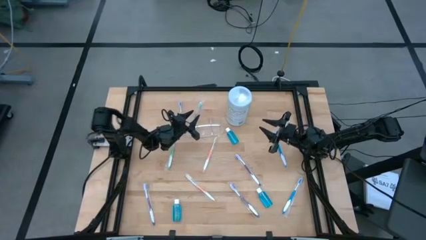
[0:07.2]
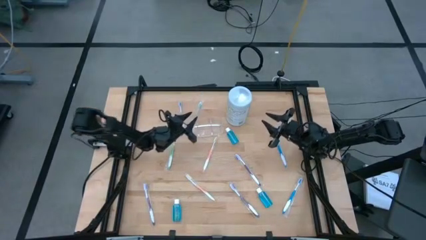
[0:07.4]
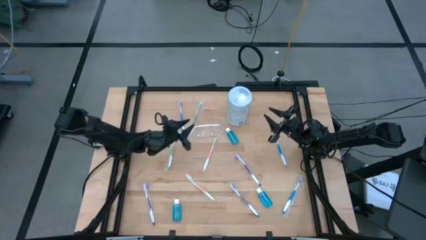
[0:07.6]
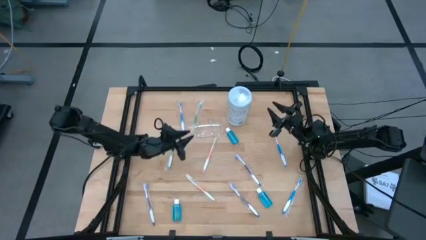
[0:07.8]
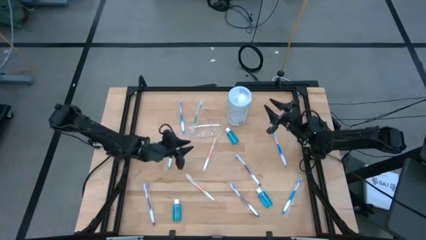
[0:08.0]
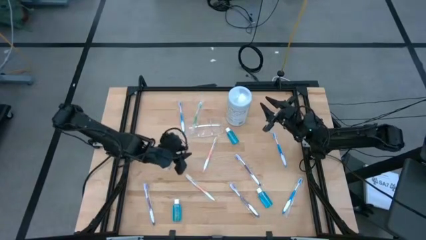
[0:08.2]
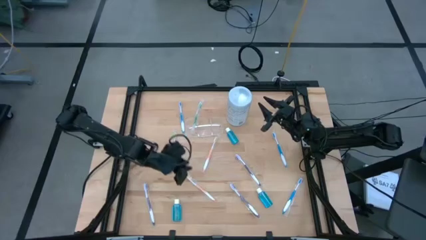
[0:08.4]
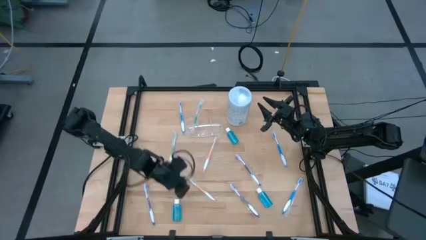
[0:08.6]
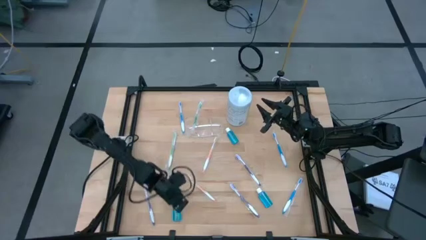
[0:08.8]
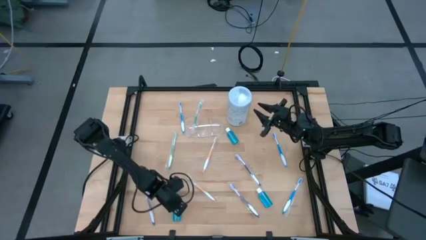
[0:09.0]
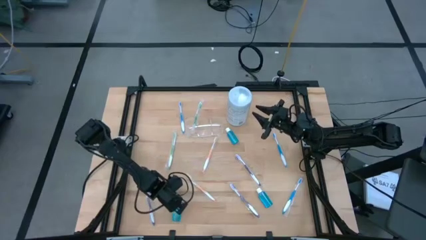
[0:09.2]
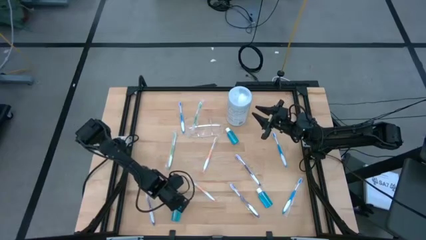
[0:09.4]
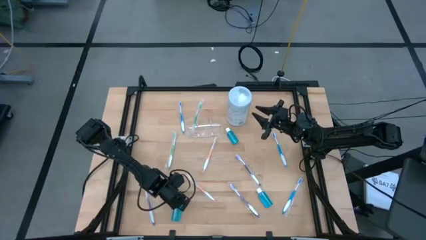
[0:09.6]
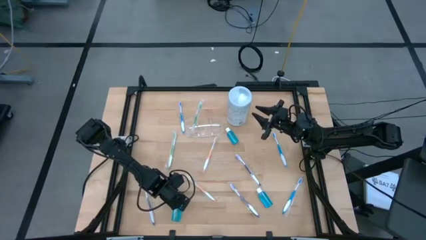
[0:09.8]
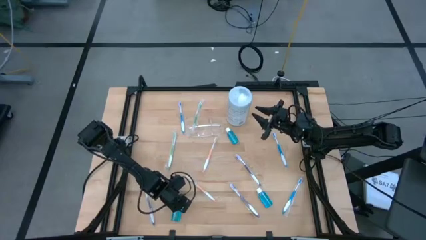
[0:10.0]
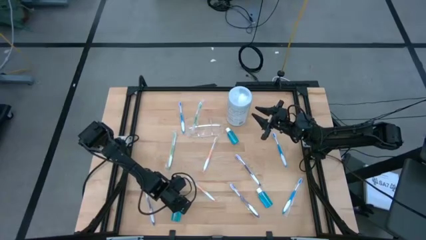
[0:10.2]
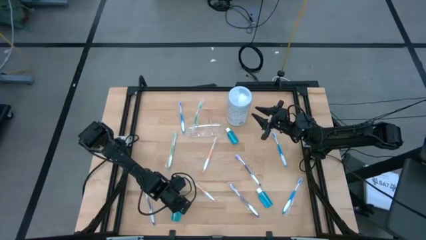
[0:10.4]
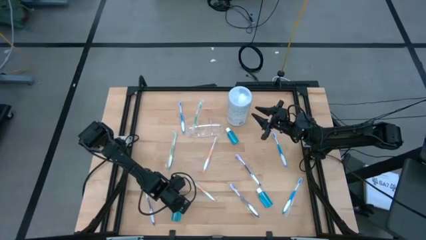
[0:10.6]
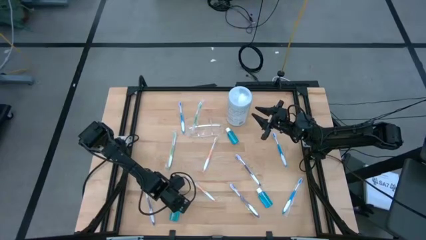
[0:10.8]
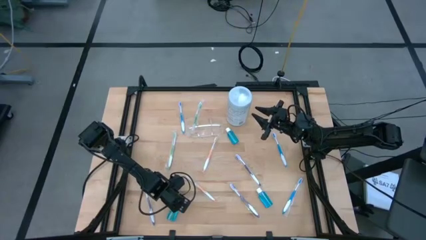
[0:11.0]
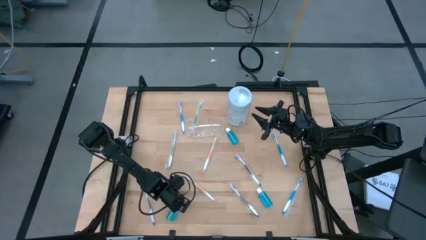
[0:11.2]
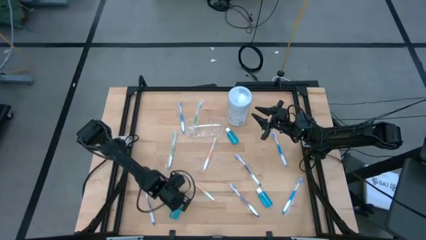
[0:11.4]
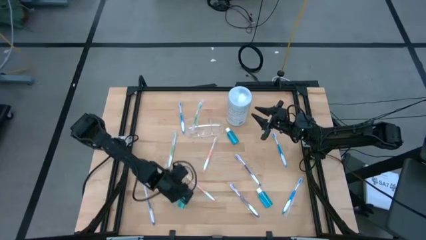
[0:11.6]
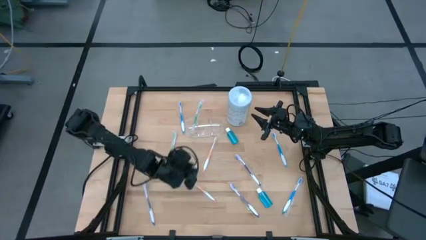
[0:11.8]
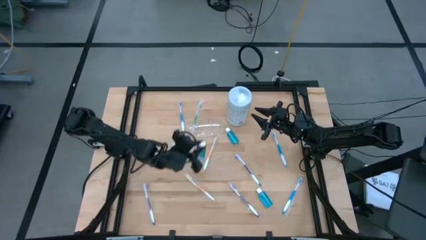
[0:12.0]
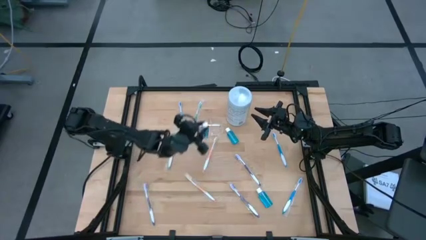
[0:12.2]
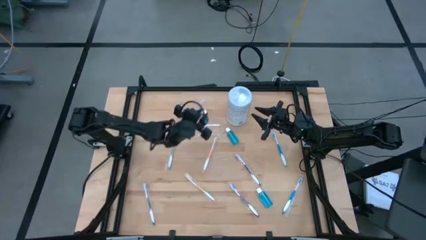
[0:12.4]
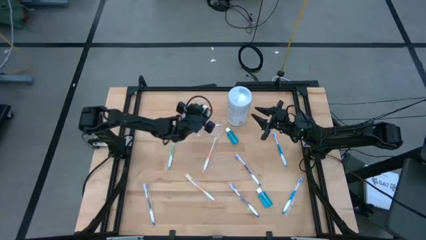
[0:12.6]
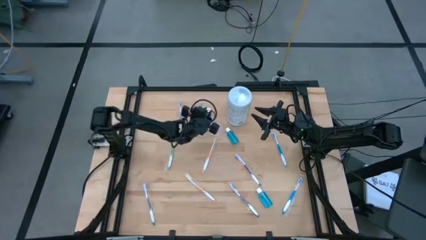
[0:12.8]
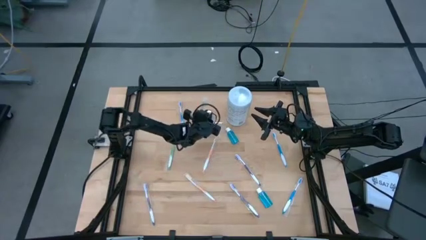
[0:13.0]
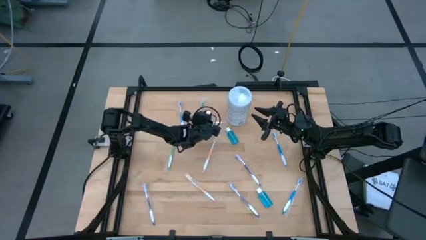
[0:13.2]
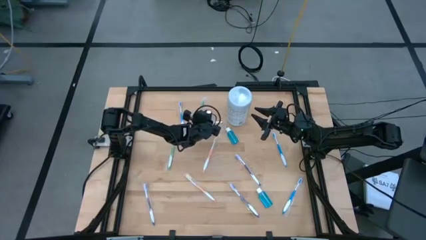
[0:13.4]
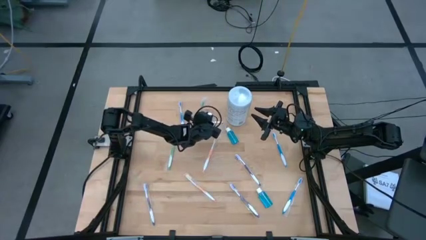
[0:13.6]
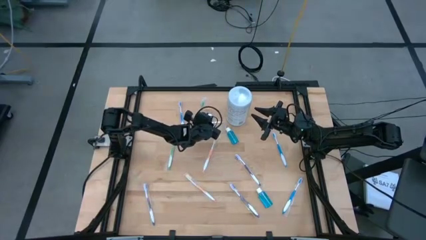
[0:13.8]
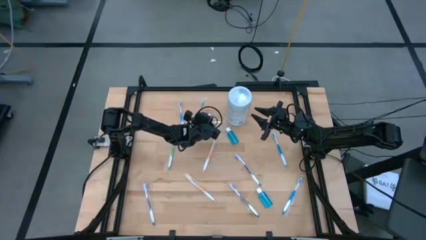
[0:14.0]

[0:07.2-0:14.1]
Task: Pick & Place toothbrushing station
Put the bottom left mouthwash into the transparent organizer

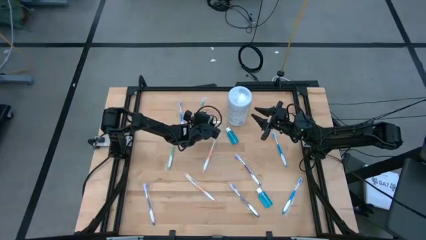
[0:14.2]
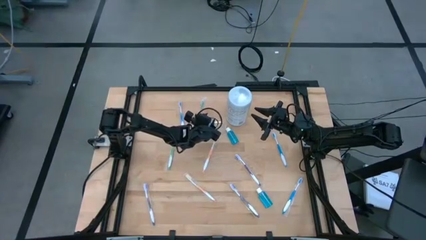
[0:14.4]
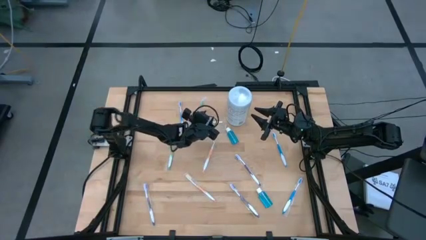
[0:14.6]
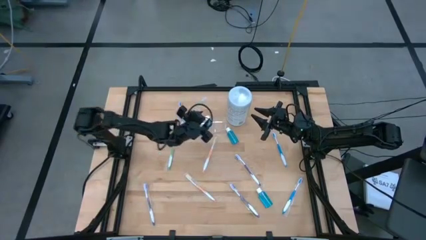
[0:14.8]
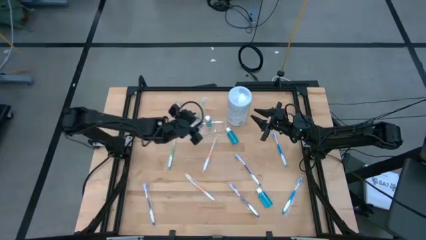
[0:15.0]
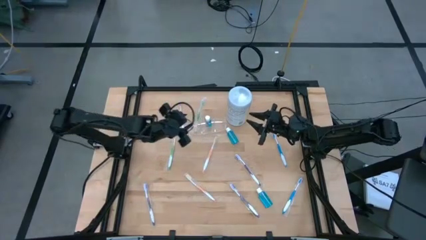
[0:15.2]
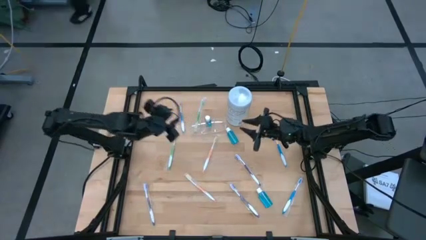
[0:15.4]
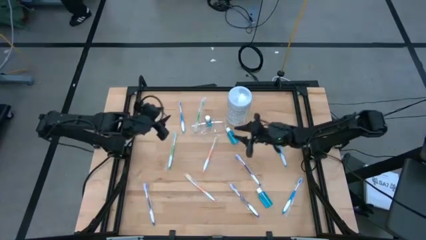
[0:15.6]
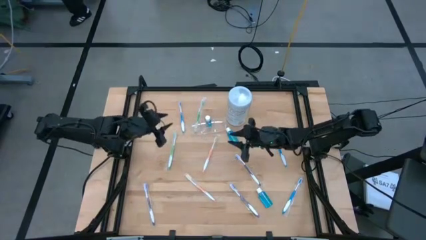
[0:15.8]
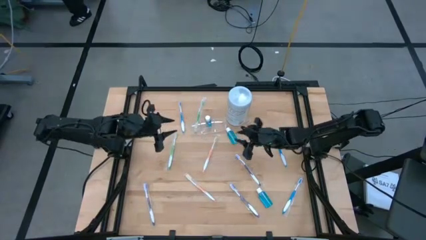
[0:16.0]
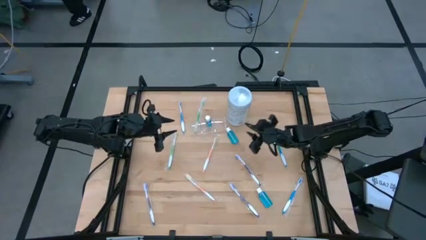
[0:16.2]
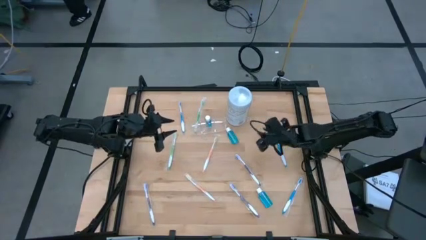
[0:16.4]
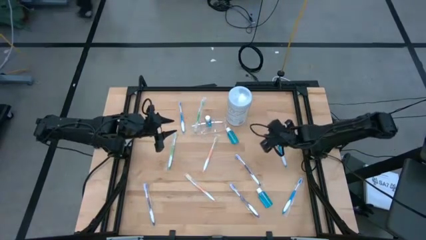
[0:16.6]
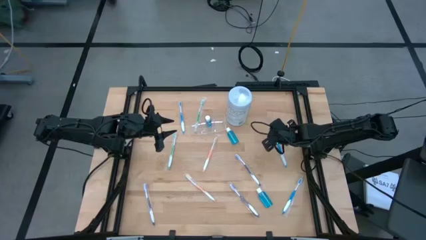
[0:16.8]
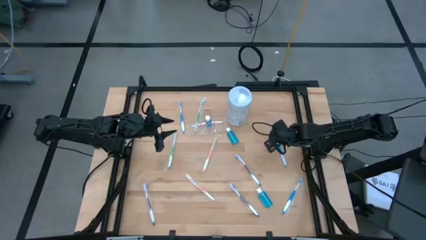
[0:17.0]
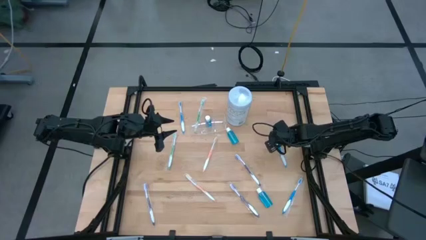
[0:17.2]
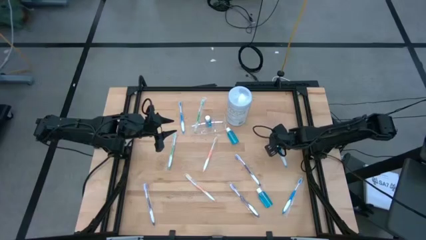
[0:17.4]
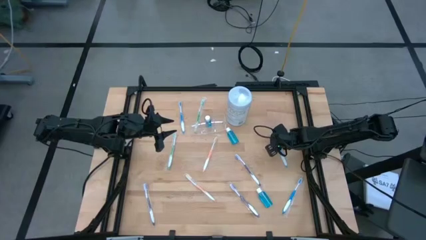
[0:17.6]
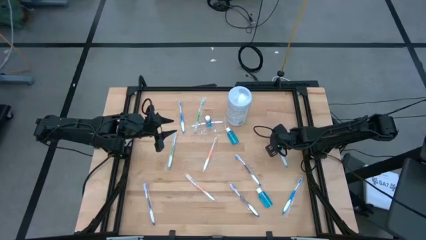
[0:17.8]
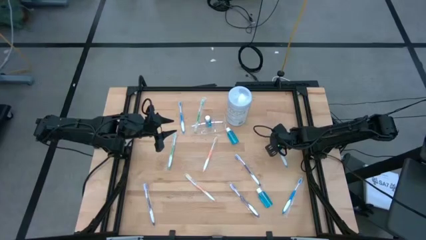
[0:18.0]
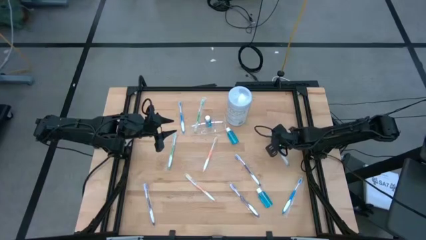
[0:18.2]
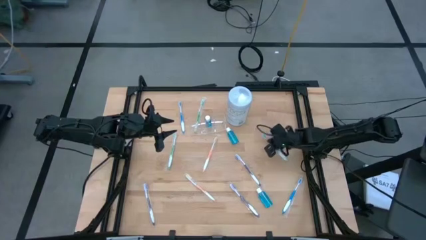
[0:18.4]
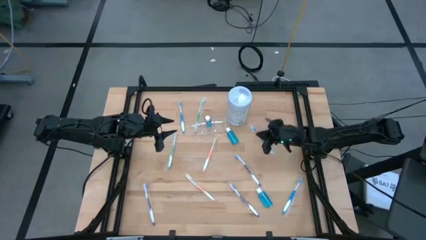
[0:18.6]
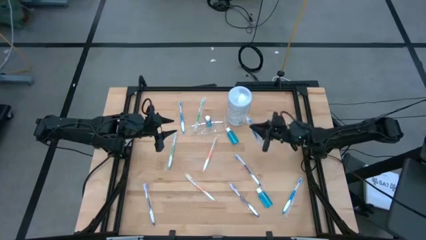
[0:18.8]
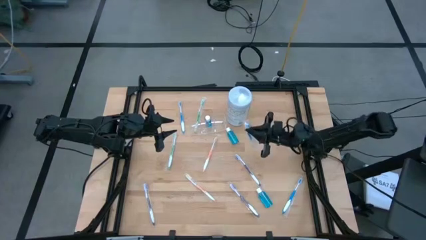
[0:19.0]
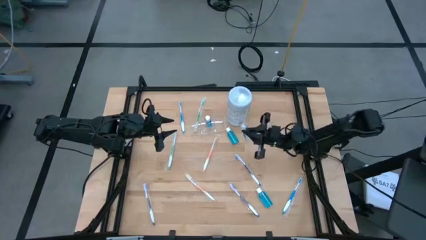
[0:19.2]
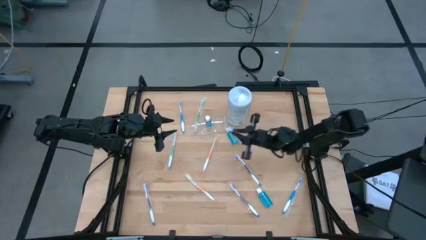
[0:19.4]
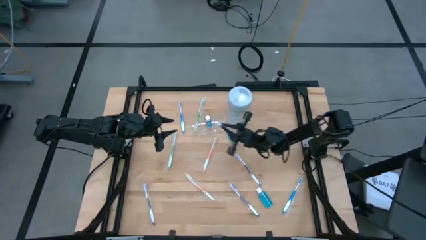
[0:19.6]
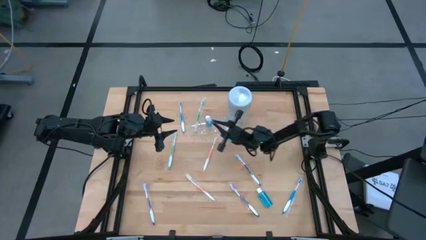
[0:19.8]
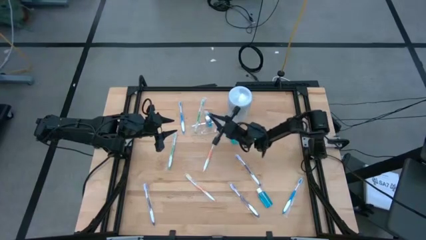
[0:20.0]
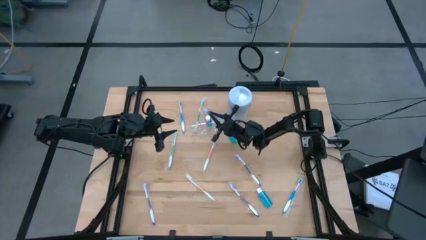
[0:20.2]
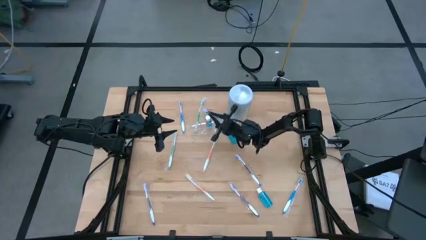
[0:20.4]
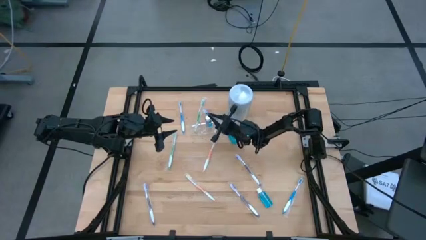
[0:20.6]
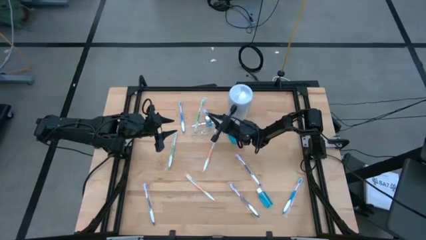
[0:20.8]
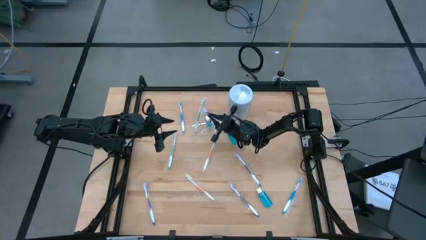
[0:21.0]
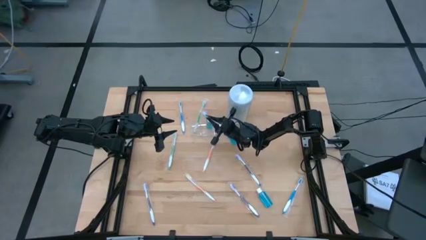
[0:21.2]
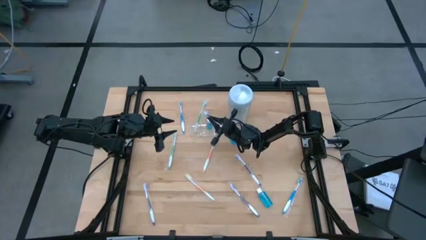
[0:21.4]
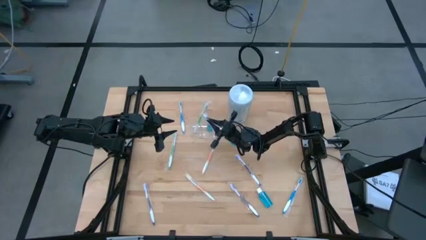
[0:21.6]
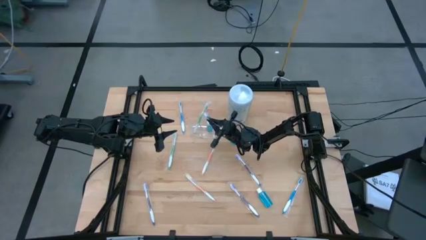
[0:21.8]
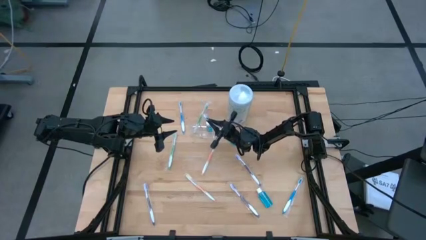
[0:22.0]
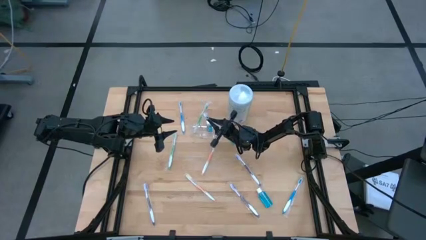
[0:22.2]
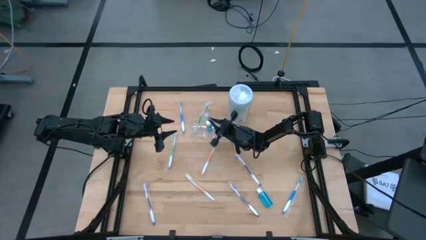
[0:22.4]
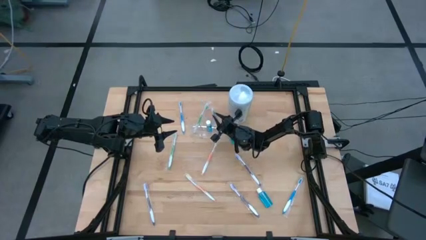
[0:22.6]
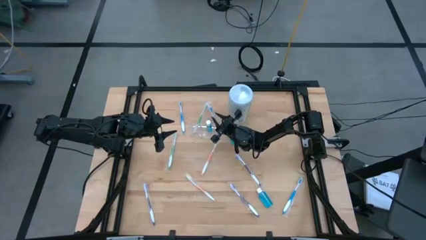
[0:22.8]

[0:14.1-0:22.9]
Put the middle blue toothbrush into the transparent organizer

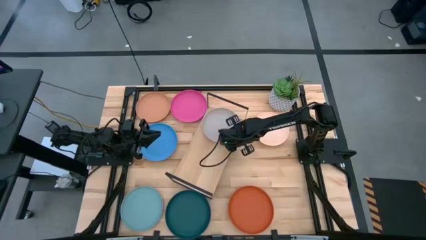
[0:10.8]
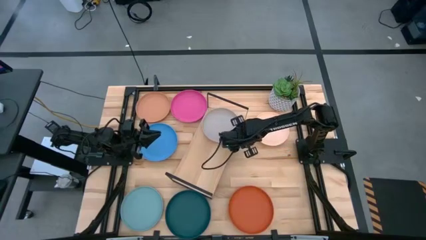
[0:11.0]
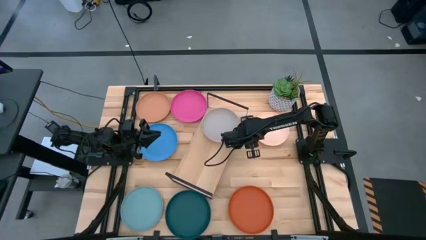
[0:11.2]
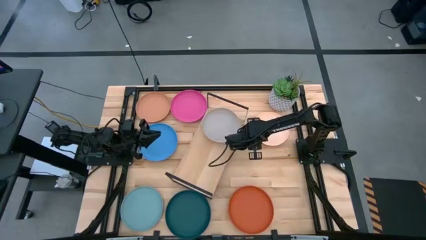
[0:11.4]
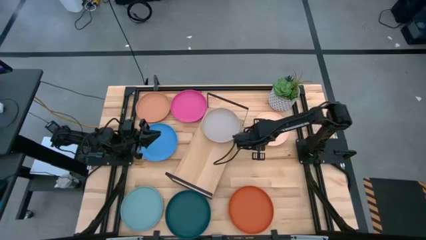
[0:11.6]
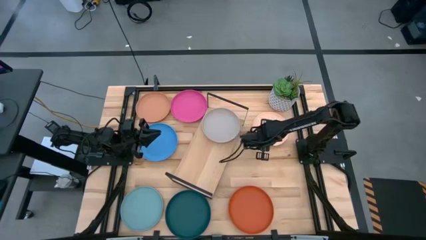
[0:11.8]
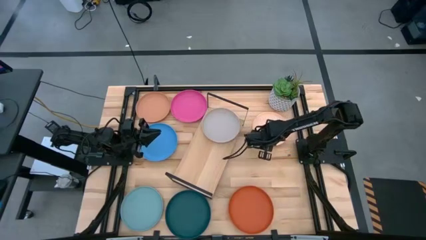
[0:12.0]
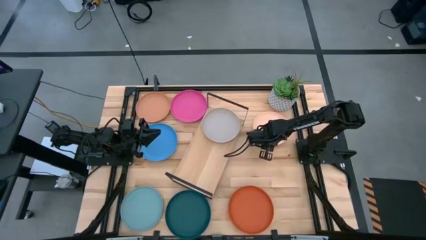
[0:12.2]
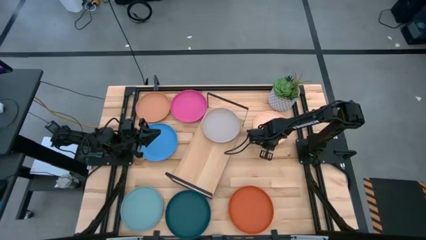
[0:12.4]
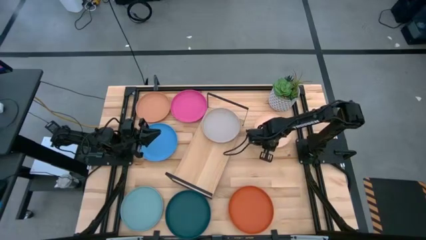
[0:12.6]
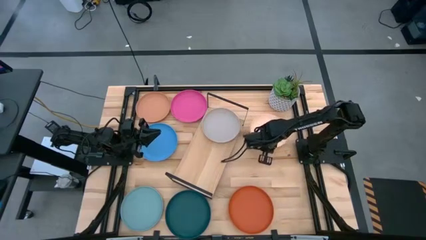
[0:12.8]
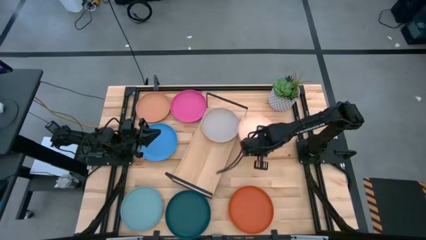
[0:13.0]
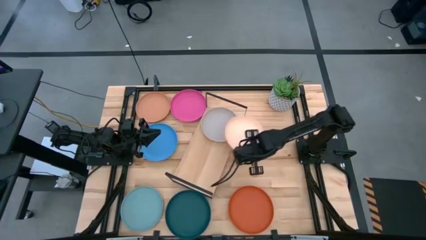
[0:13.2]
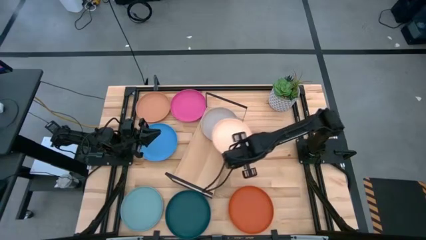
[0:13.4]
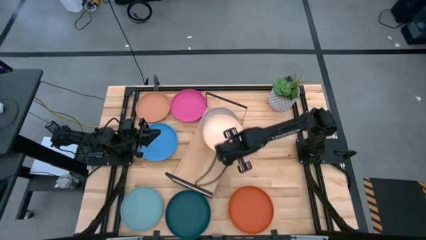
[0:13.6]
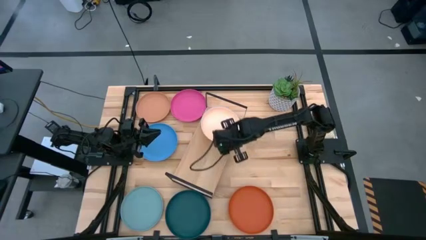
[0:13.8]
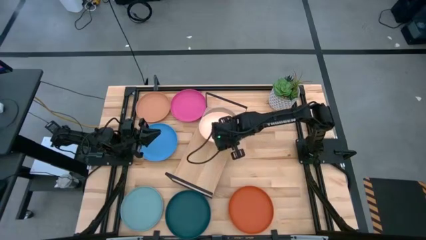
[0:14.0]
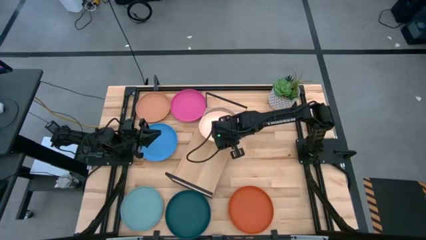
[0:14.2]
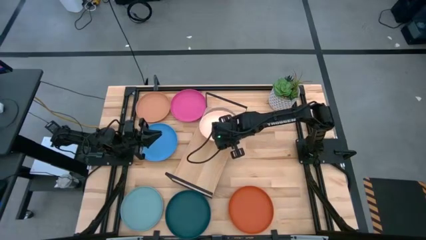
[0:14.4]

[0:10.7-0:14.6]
Task: Place and stack plates onto a shelf
Stack the light orange plate on top of the gray plate on the shelf
